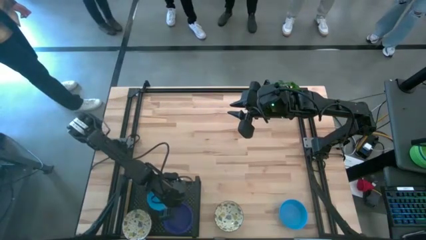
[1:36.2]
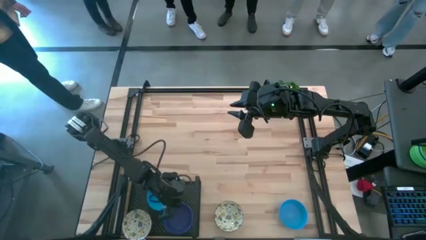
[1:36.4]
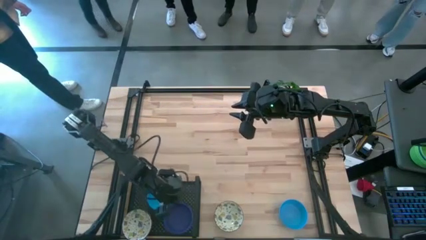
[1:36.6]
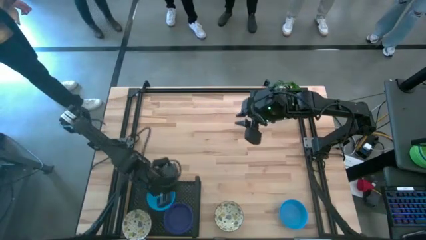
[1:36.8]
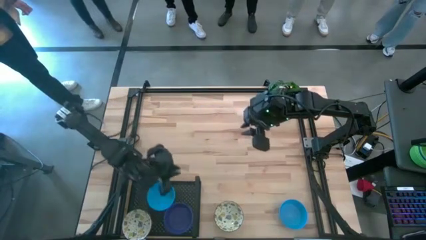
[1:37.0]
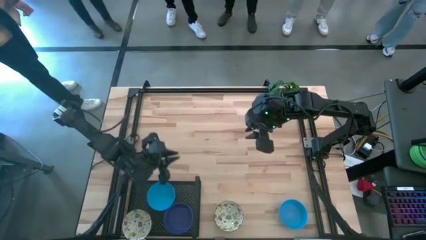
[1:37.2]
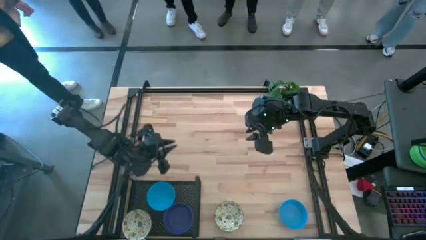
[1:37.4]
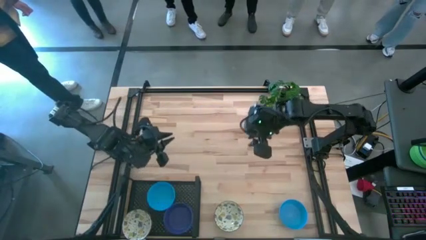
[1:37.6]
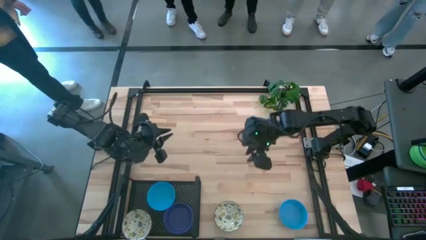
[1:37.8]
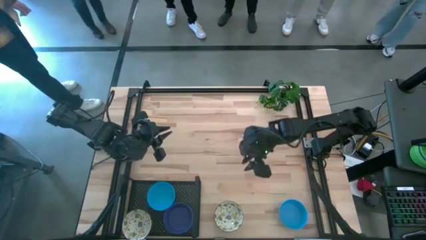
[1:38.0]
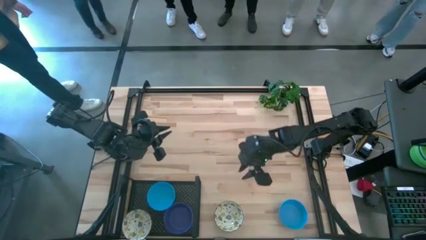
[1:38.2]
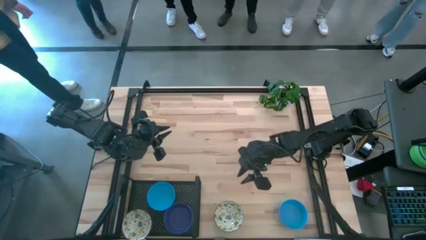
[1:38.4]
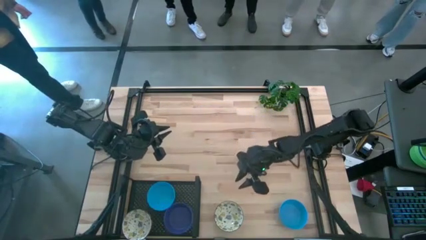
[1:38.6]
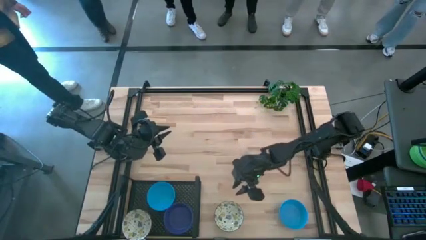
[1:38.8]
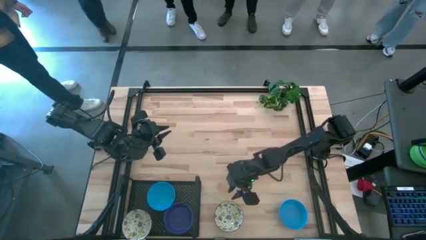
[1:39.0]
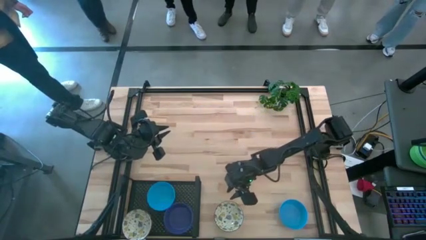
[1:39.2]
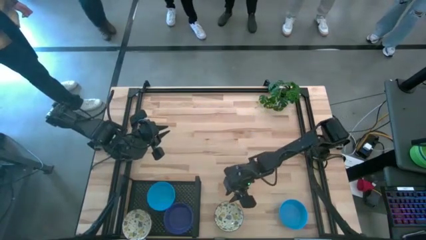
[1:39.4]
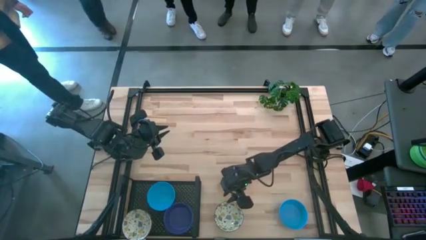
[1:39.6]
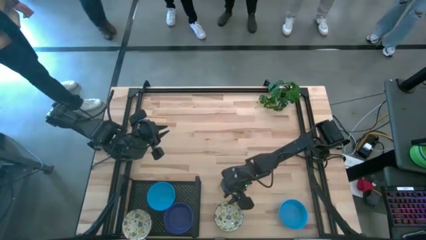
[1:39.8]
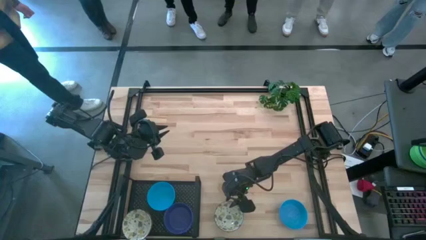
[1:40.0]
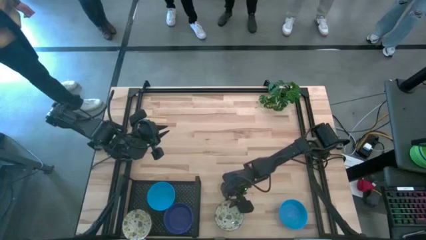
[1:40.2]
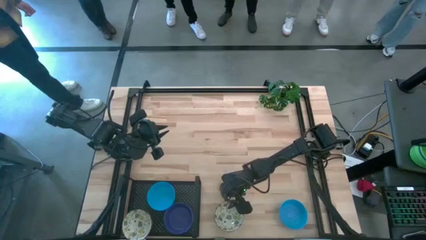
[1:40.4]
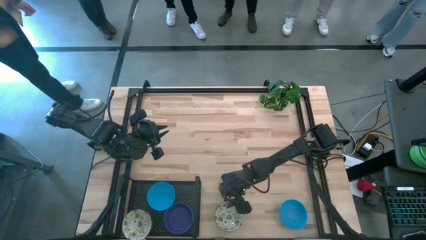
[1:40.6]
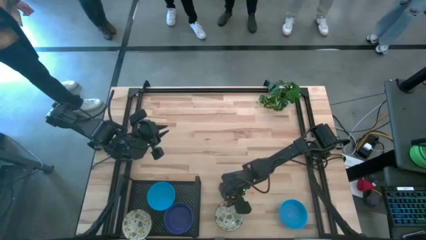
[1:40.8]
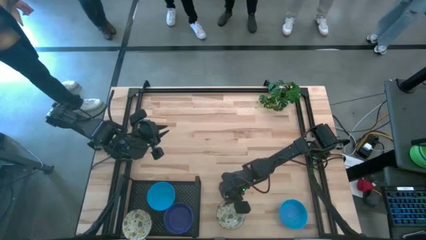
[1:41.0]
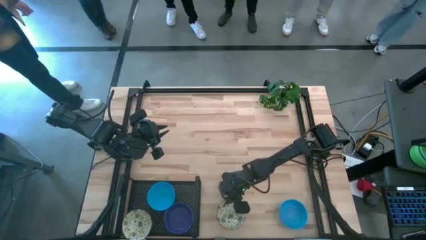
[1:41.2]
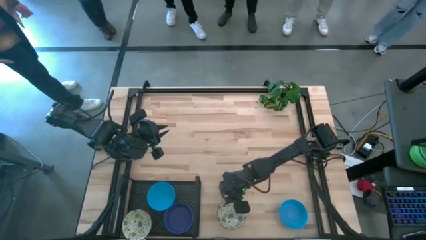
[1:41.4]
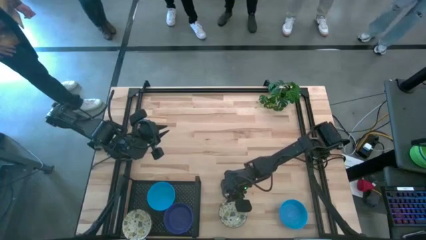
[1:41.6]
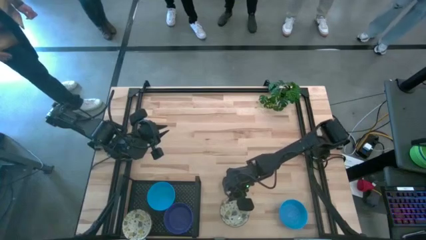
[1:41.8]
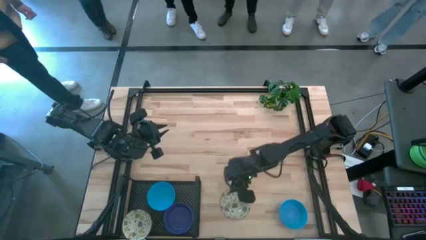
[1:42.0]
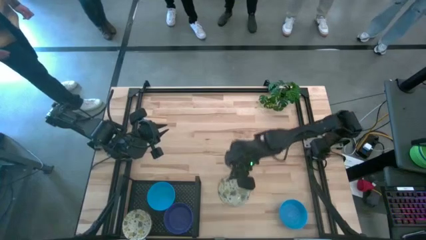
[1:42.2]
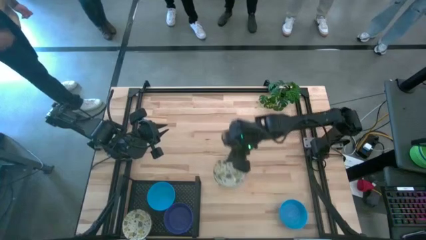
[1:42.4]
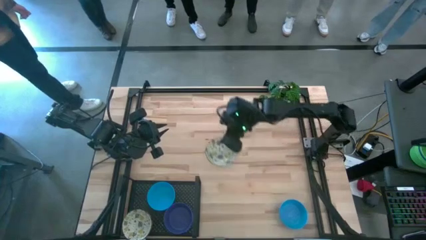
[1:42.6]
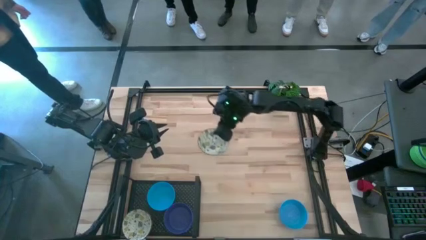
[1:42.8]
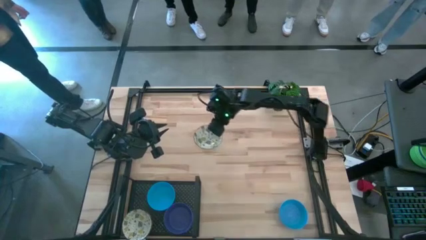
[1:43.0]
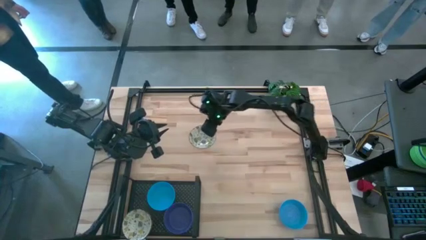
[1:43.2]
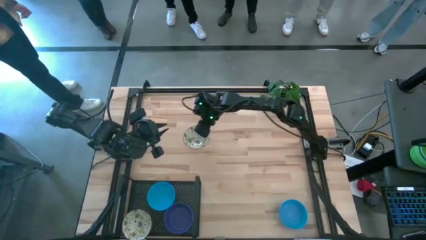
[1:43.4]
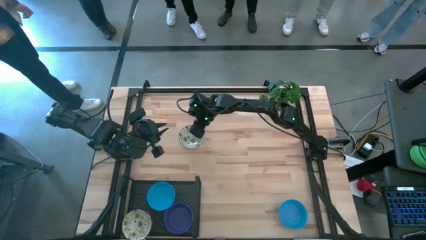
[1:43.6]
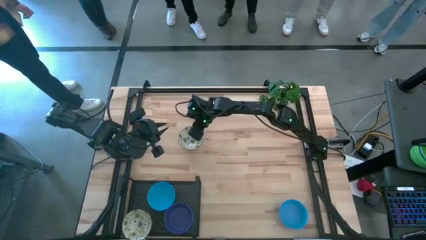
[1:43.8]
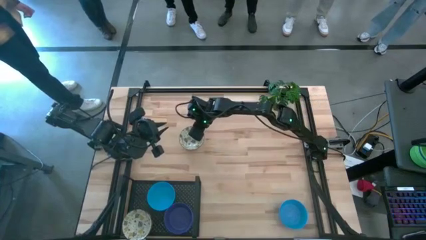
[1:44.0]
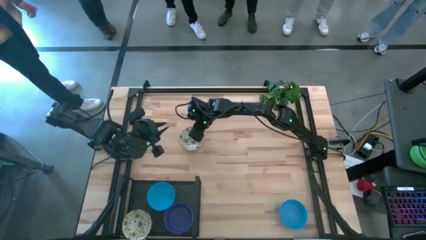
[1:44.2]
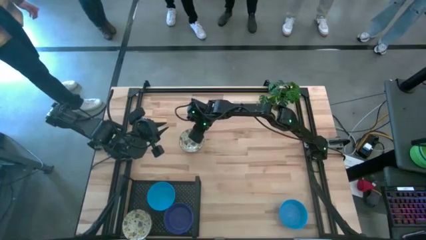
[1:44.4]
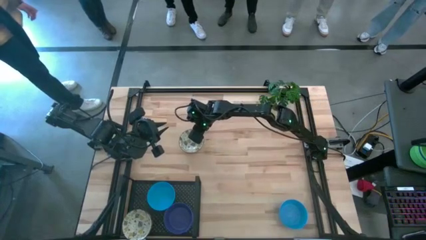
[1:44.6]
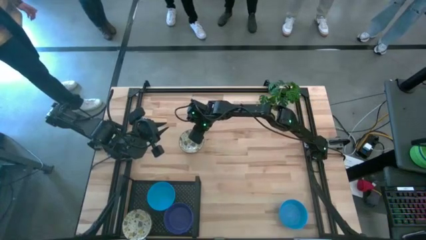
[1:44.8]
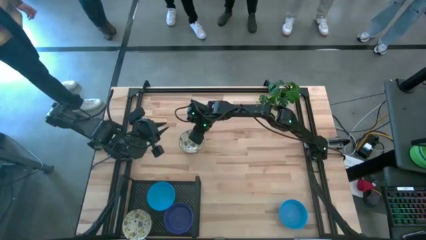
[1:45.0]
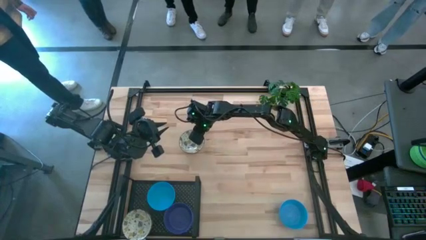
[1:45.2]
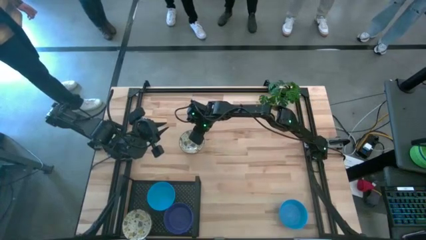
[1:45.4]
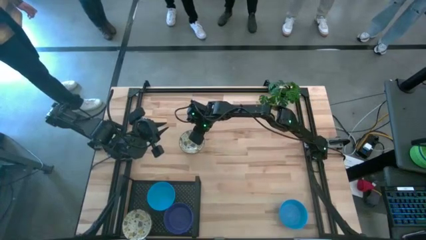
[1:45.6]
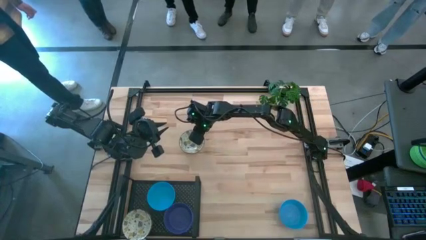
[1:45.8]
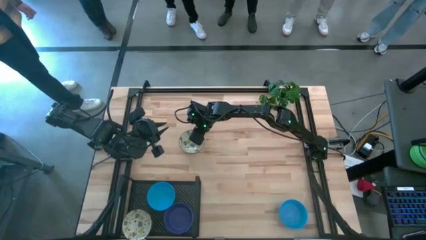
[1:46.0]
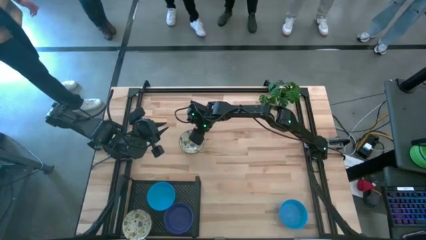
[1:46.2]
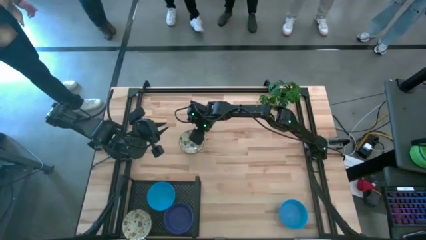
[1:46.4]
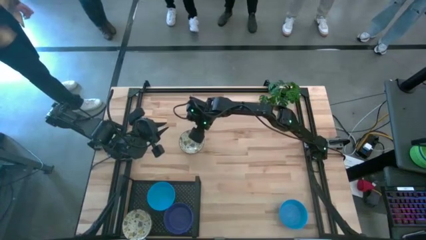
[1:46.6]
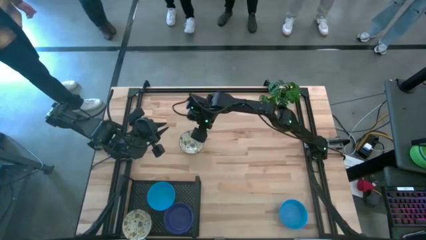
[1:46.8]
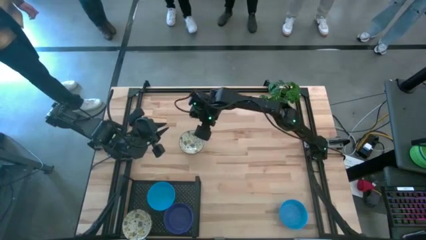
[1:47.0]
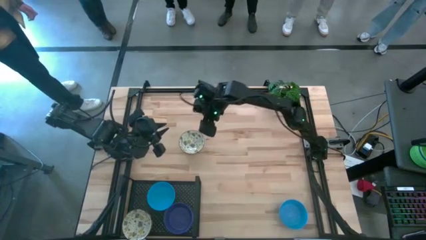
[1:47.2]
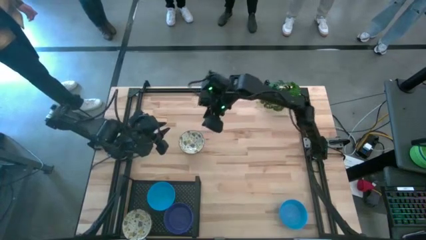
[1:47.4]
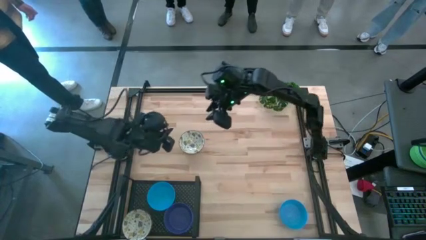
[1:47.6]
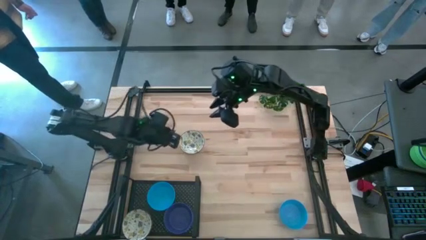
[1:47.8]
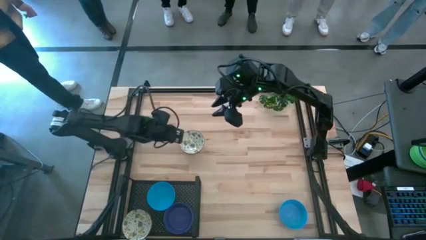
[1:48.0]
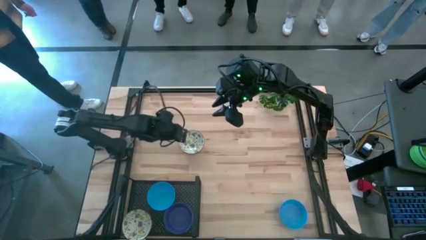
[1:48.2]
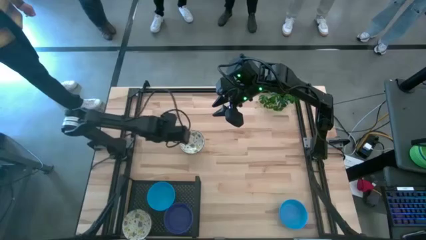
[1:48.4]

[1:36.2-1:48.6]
Task: Pick & Place Mini bowls
Stack the yellow patterned bowl on the yellow patterned bowl on the shelf

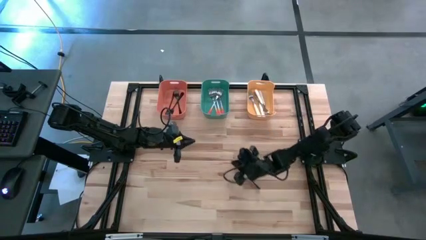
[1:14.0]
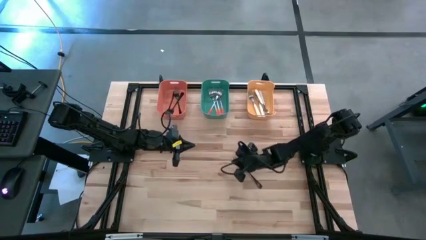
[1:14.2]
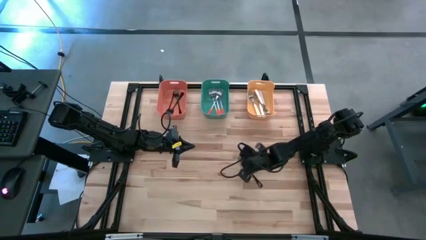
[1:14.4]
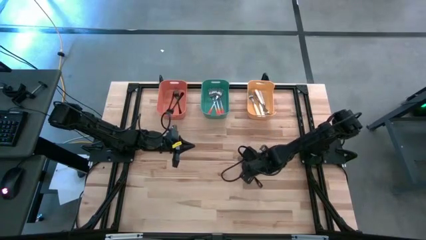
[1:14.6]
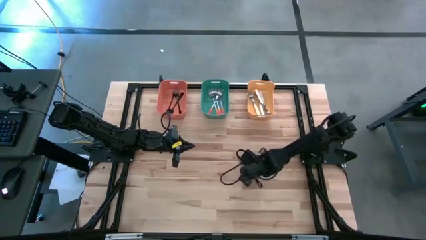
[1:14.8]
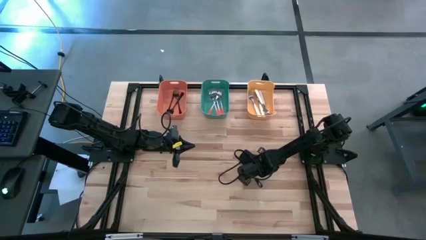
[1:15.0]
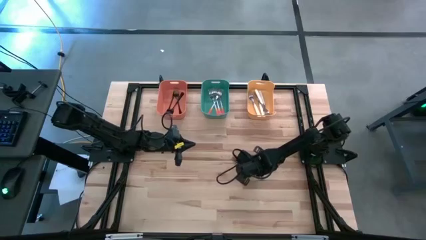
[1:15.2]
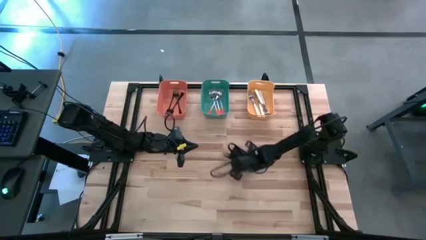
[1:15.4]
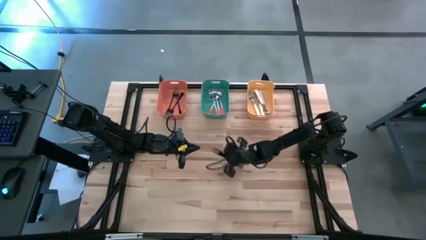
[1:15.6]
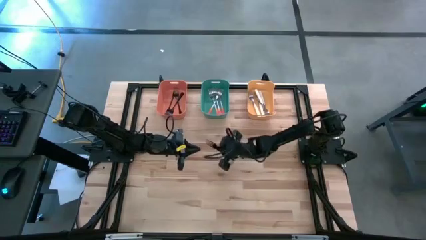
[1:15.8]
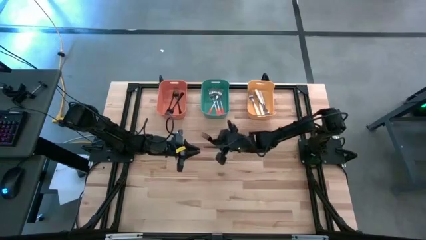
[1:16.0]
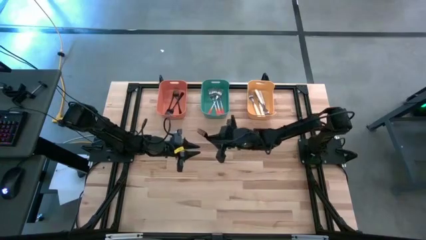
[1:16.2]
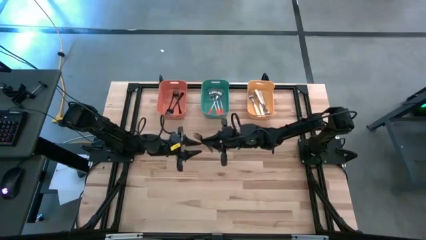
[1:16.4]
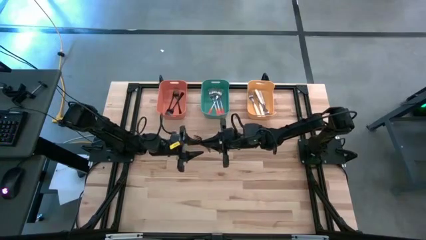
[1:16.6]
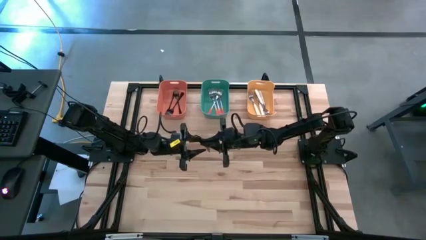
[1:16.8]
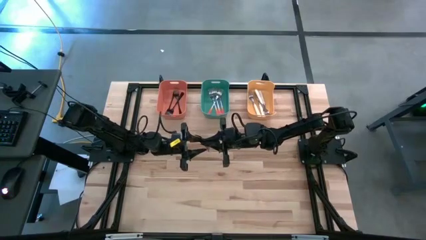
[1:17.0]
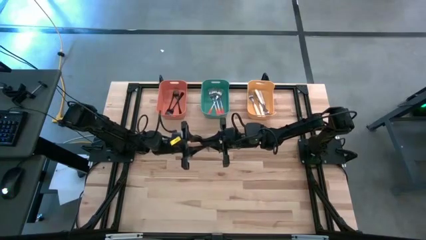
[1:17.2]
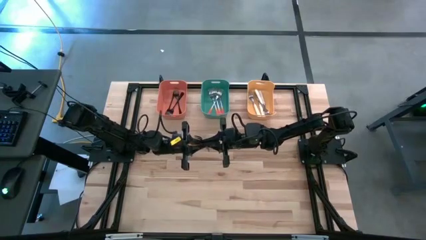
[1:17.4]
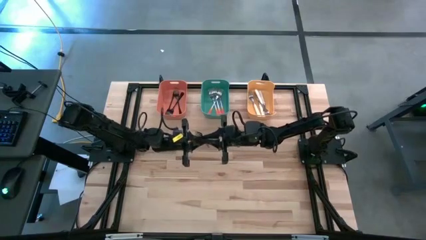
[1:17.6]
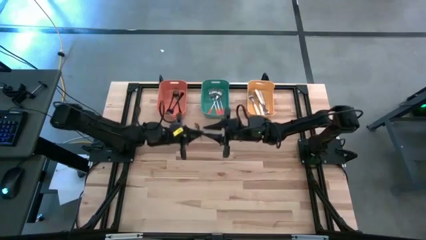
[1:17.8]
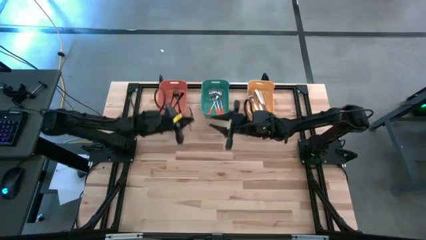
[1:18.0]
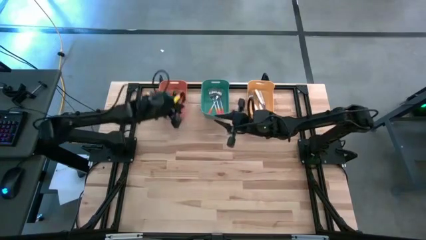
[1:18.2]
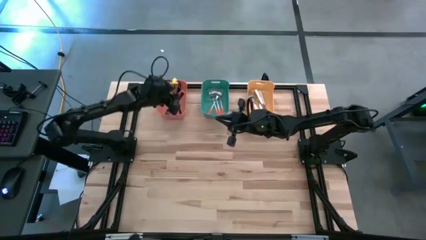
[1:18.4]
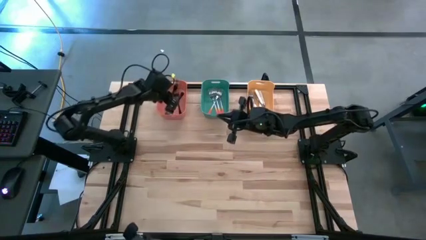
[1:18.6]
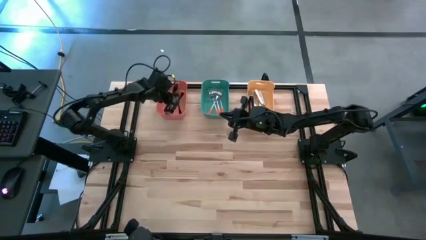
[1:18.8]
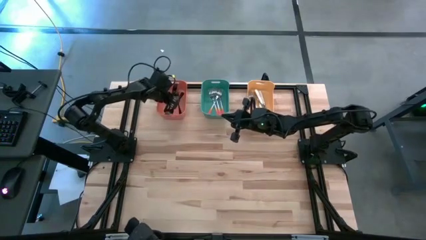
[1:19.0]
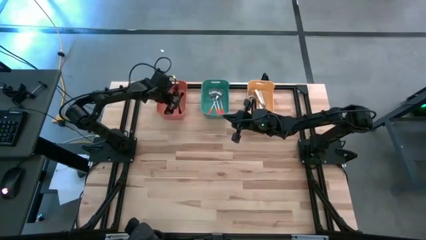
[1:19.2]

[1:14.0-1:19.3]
Task: Sort silverware by color (type)
Put the black fork into the orange bin
